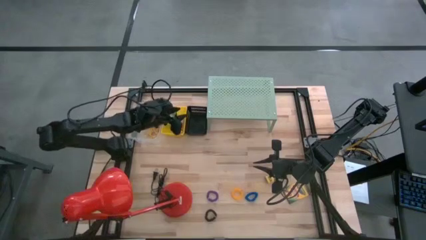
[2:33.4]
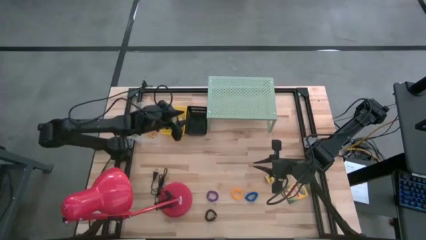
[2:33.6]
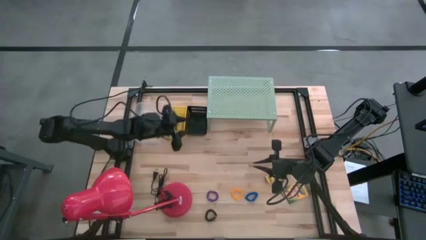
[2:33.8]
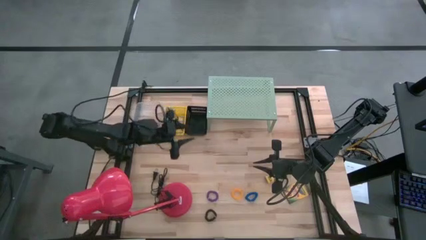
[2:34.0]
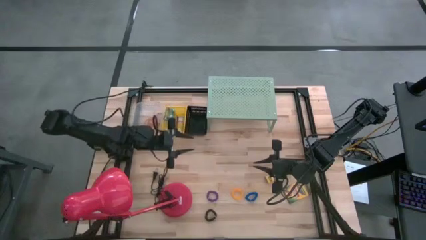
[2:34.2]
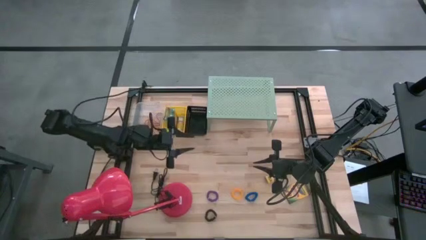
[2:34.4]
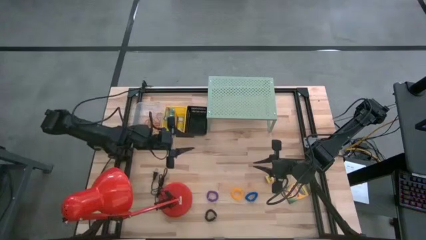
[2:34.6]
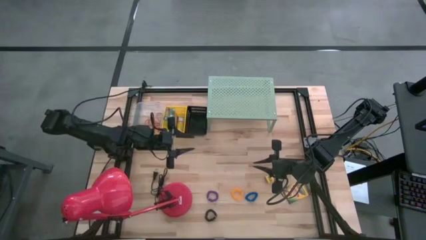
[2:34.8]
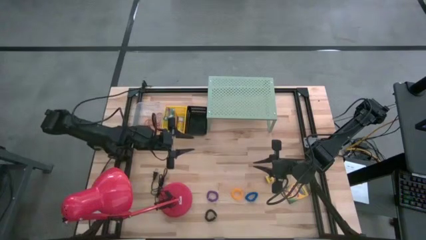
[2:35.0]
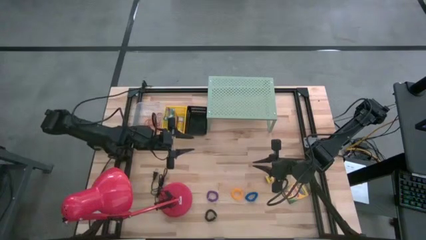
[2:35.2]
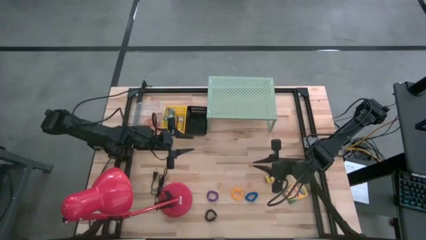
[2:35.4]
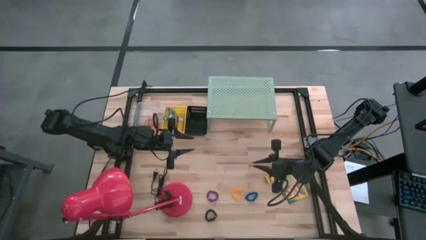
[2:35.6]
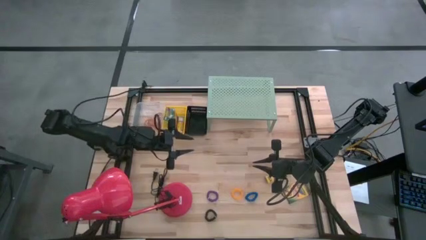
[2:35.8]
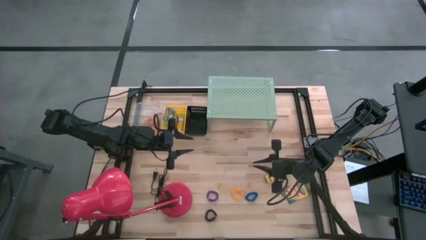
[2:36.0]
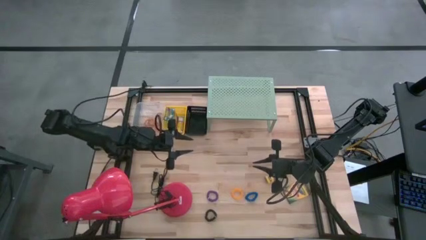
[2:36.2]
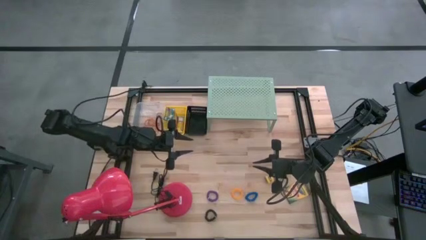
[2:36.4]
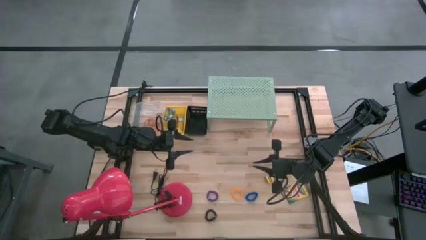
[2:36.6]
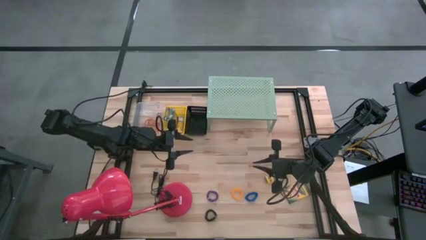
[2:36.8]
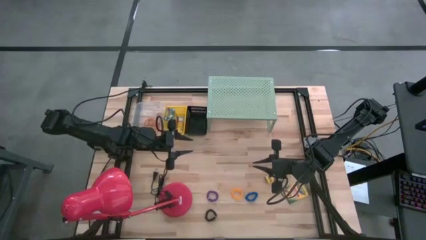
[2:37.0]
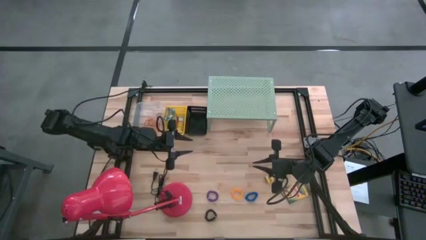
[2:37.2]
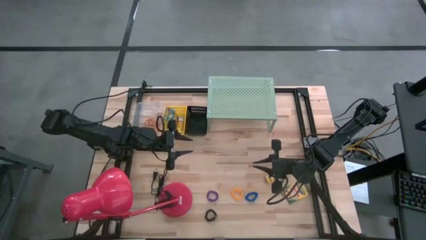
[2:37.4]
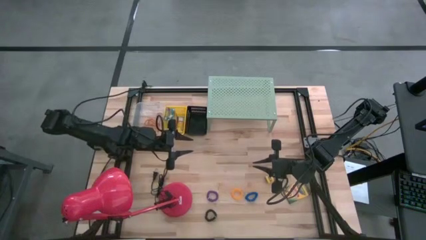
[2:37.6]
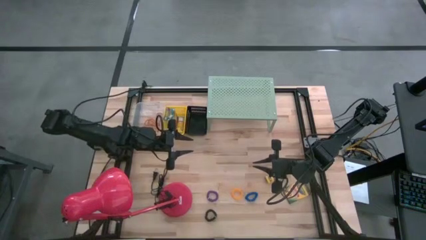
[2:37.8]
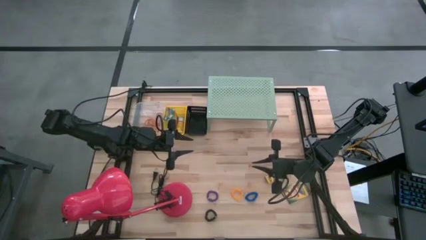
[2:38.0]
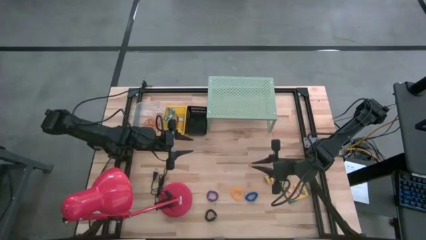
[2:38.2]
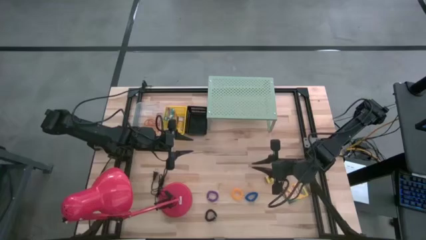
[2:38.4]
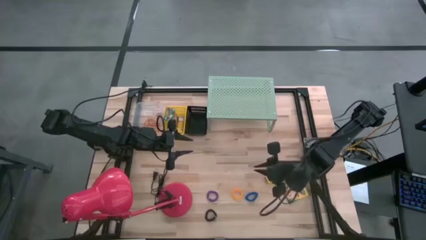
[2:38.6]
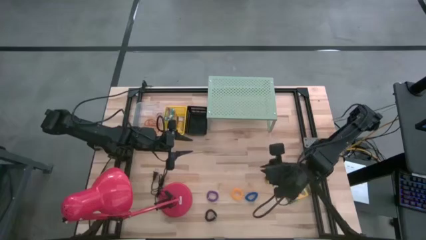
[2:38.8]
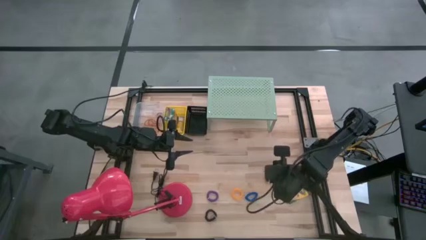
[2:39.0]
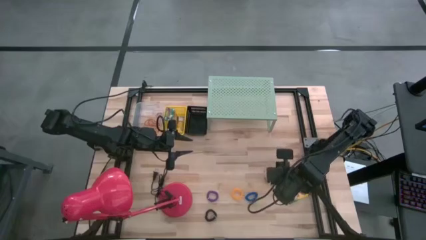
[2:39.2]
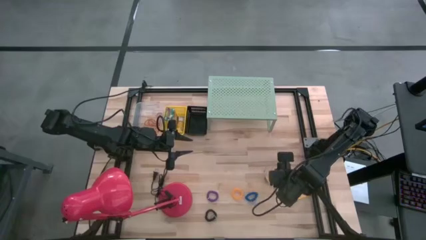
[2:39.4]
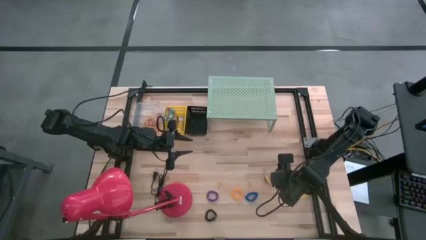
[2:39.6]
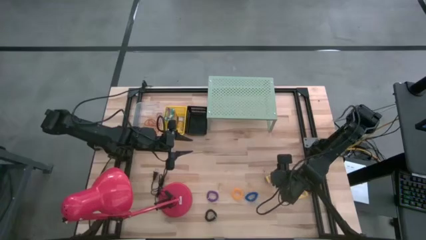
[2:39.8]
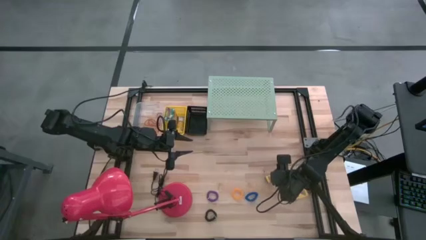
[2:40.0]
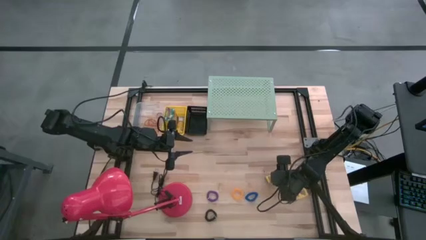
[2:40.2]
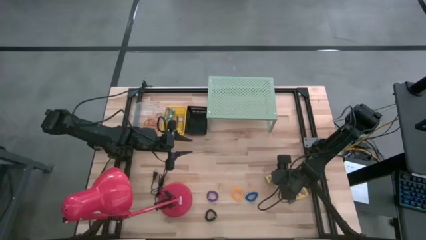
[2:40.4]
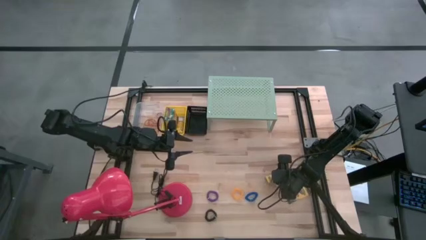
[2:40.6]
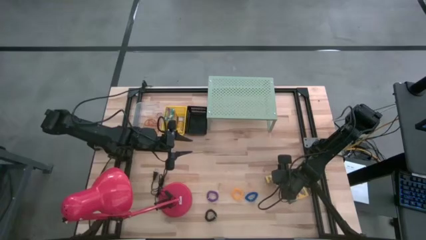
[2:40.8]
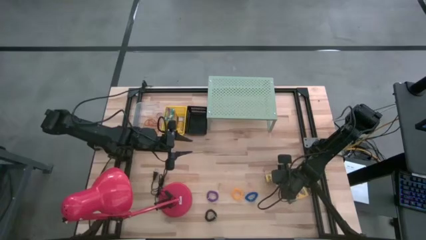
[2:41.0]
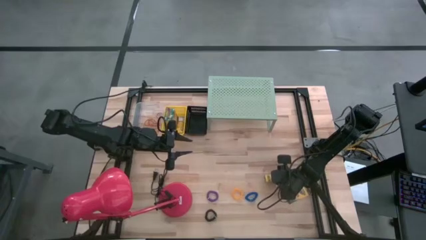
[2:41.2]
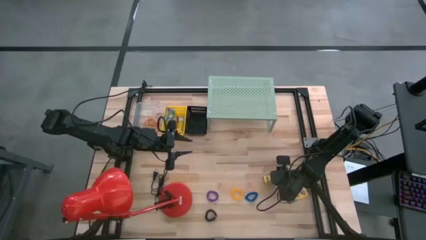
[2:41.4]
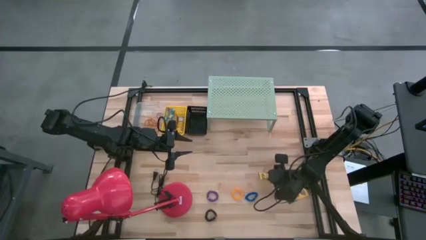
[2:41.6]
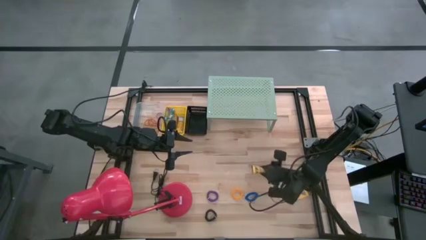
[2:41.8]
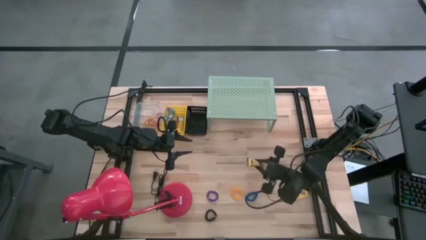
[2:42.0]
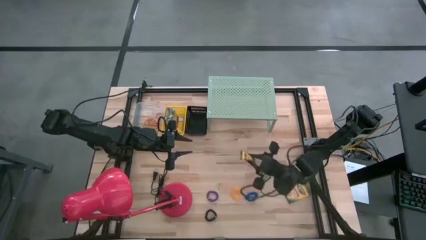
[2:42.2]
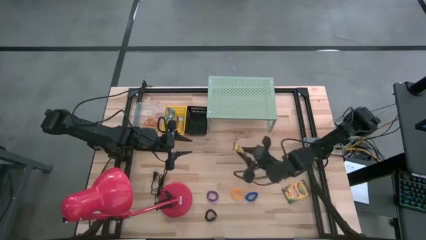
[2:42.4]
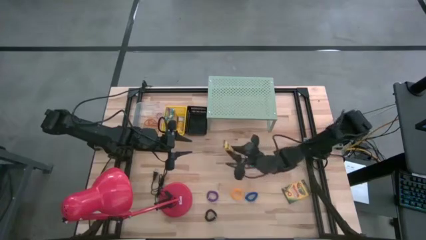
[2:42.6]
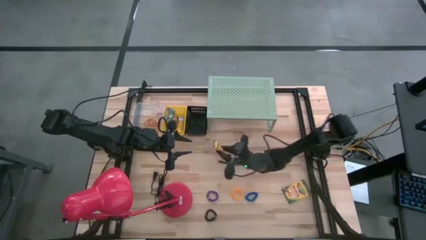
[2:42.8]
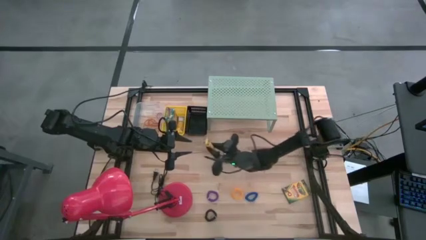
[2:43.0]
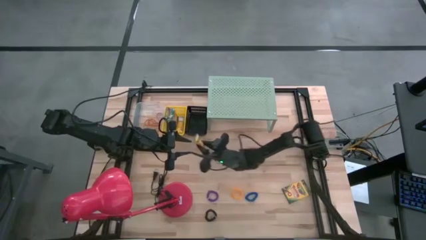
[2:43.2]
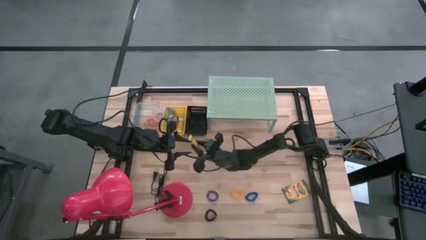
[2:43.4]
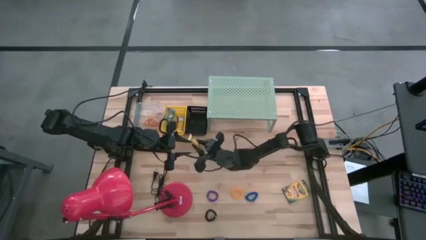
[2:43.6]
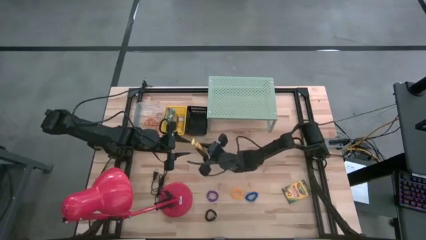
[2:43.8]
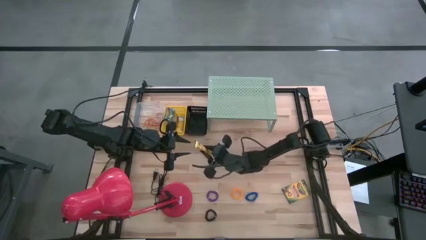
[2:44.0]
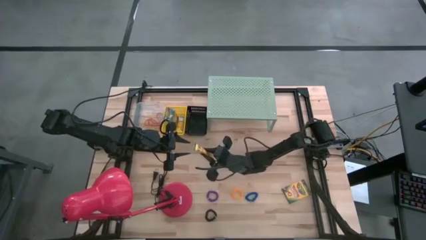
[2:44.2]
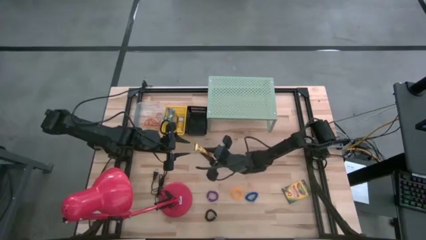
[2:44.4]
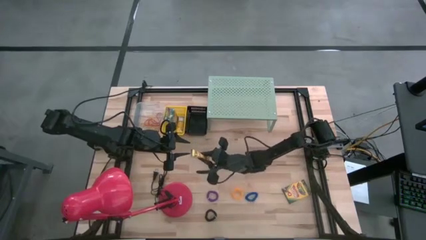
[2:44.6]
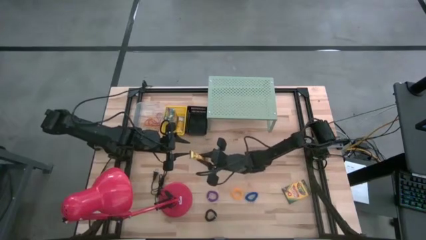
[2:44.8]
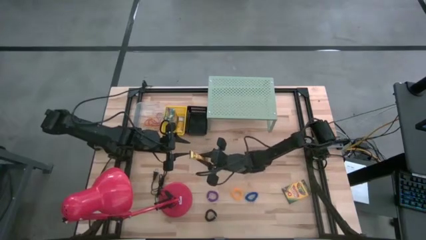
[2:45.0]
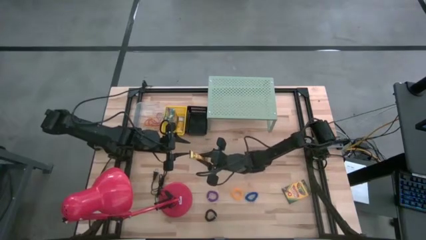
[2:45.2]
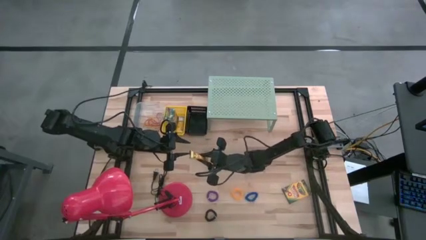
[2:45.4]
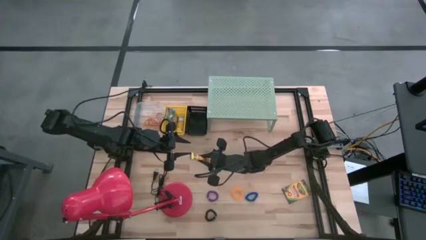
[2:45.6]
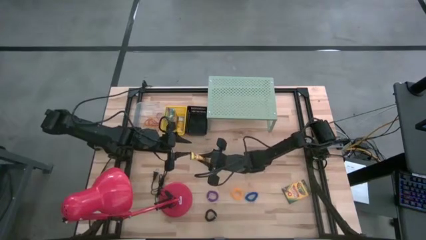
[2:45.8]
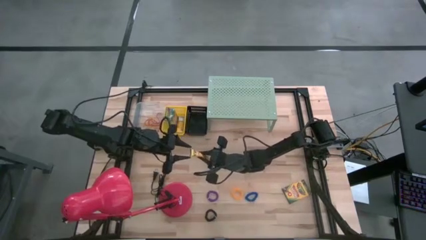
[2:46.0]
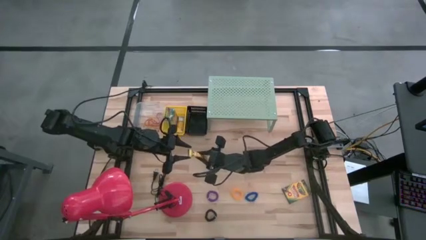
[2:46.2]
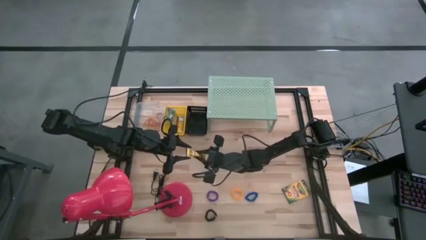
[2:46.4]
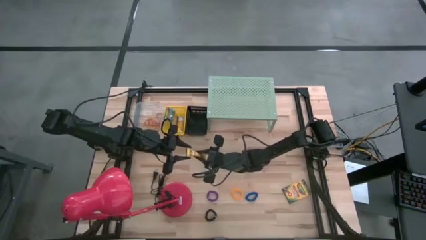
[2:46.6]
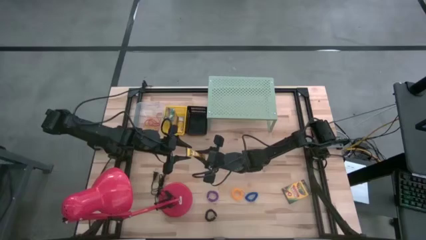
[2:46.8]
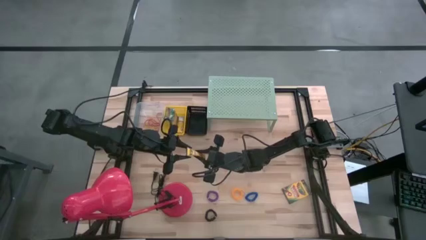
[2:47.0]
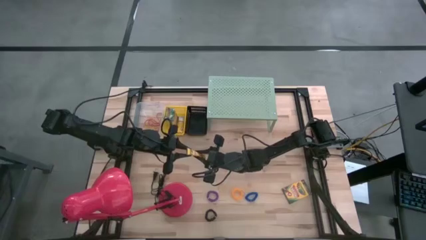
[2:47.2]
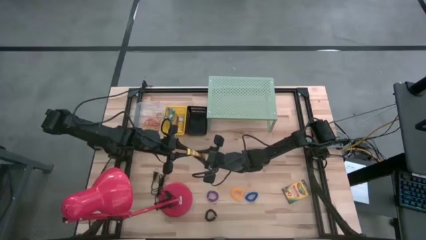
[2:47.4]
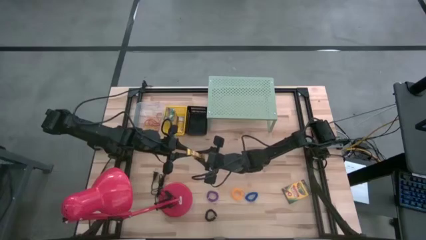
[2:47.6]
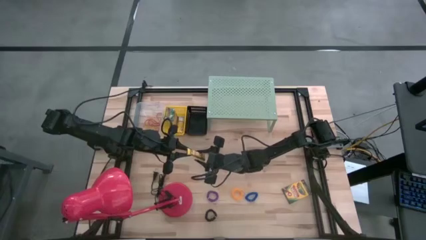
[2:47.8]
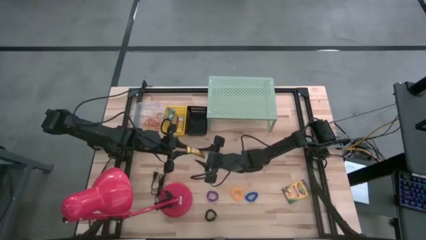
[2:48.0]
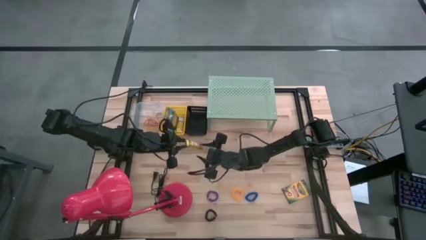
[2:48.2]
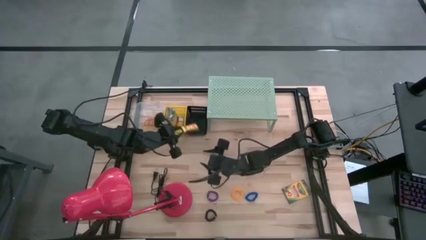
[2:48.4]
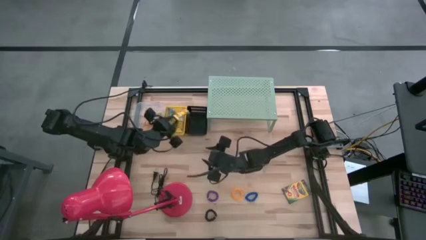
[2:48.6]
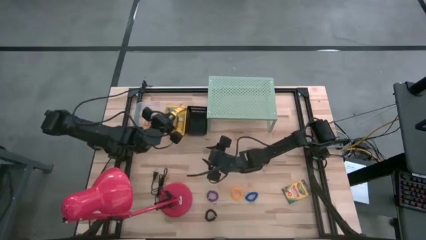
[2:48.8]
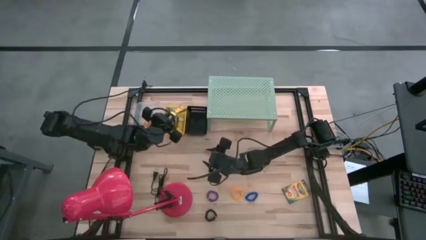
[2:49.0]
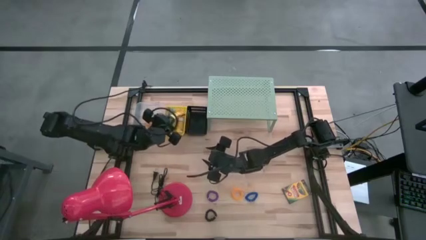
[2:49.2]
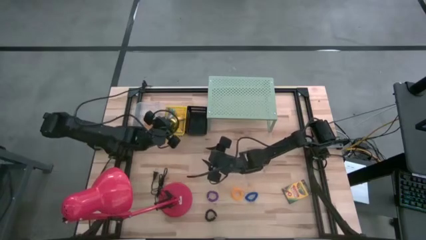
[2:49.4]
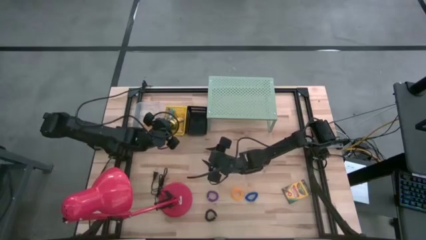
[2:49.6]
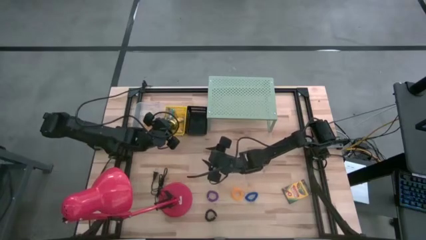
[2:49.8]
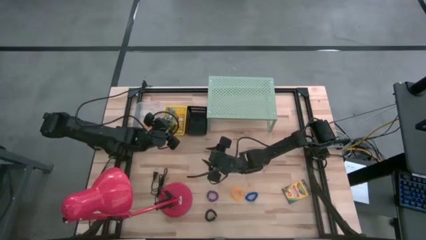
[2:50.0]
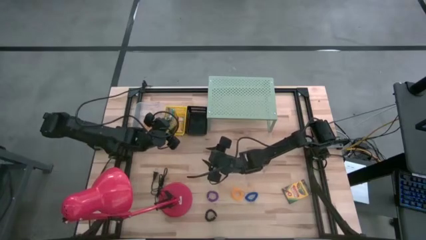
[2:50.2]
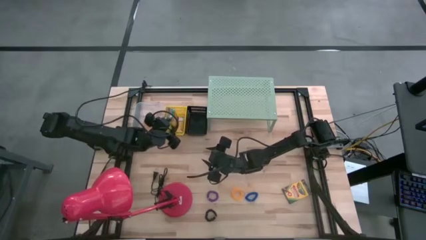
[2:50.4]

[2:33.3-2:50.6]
Task: Pick & Place Office Desk Supplies
Put the crayon into the yellow bin
